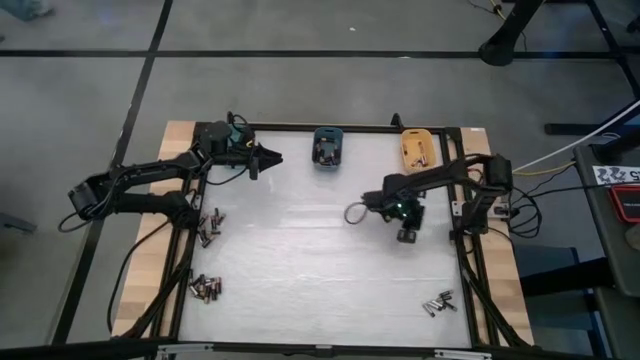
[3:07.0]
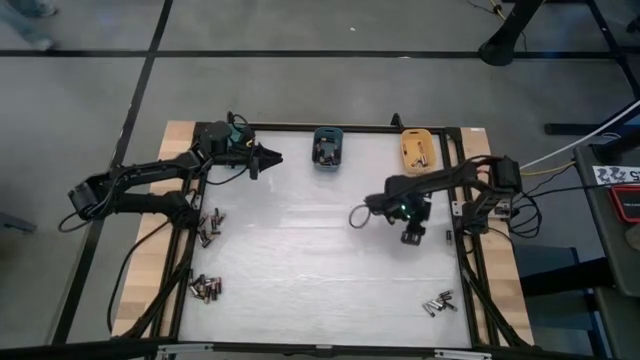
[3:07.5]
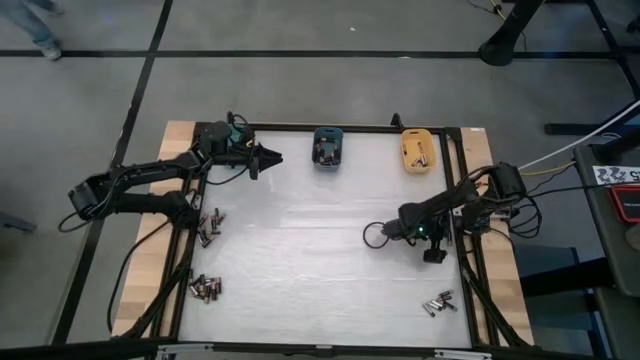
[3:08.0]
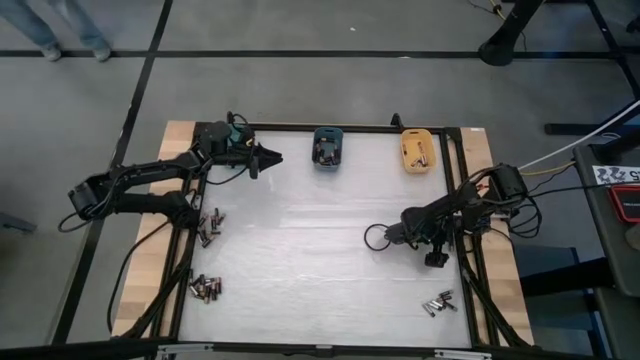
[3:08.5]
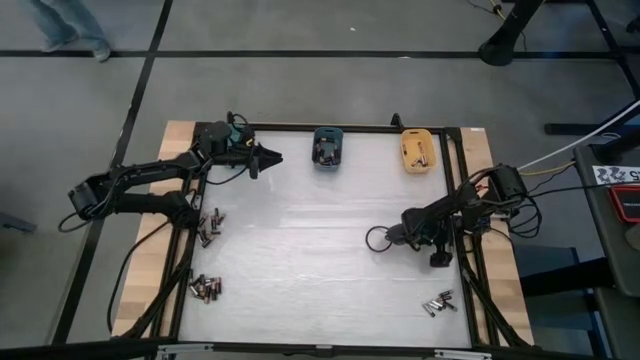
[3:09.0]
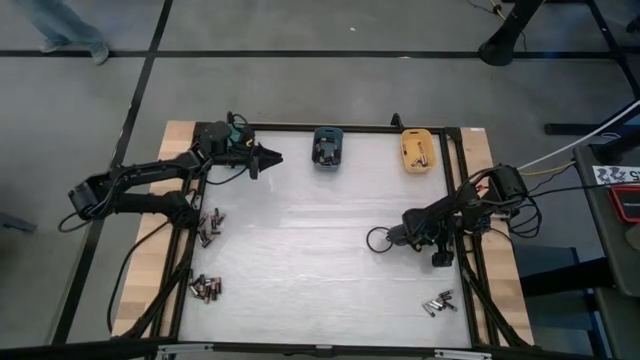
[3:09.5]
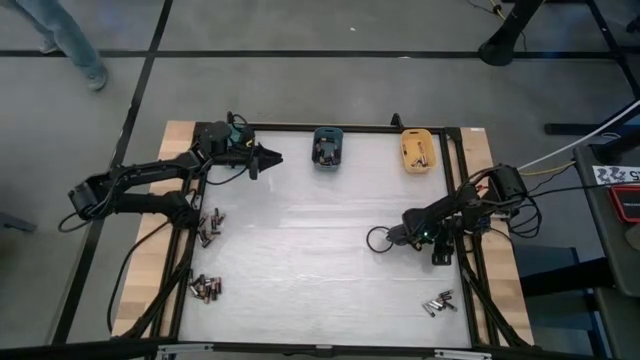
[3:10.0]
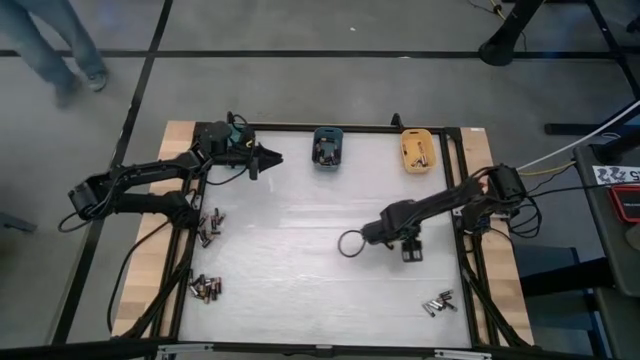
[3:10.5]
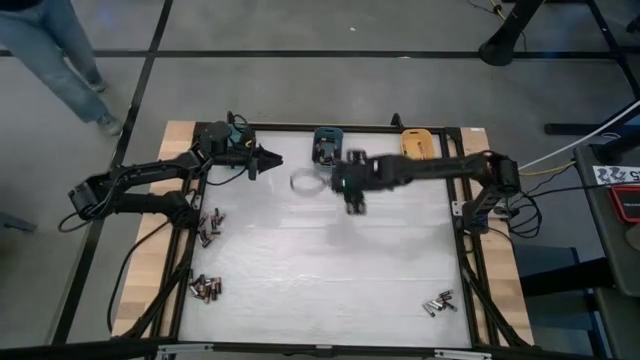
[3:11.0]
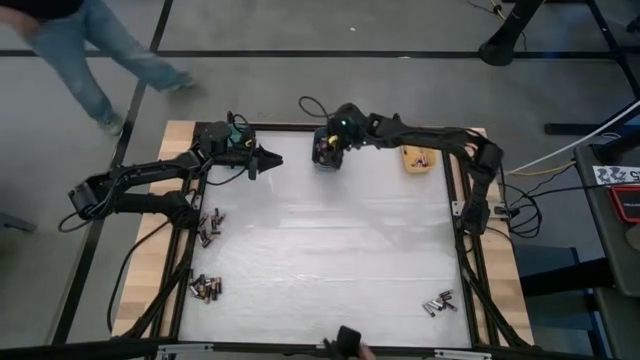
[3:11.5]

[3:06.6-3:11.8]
Task: Sort batteries
Put the brown battery into the blue bin

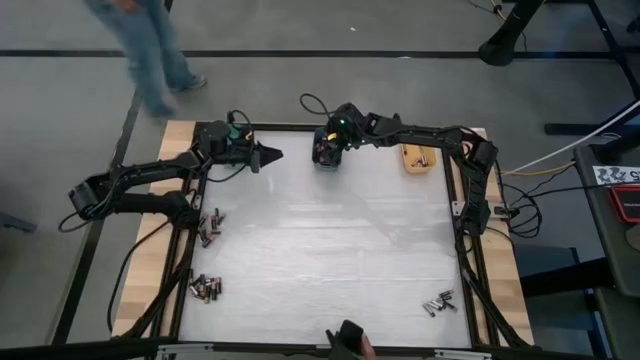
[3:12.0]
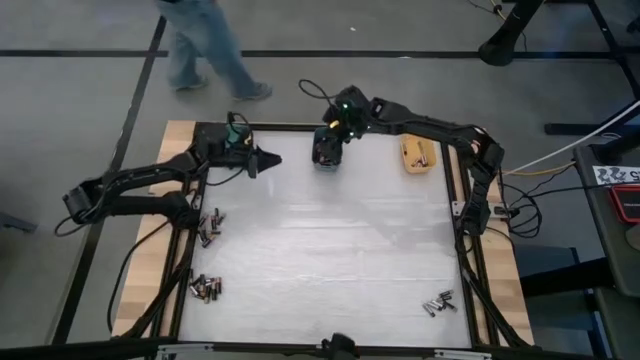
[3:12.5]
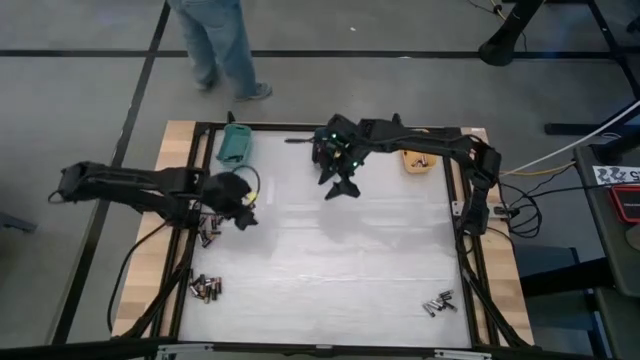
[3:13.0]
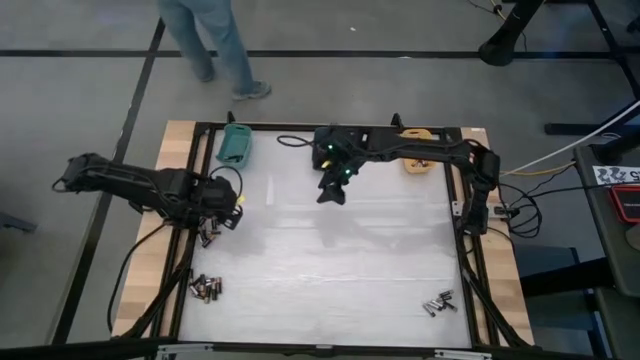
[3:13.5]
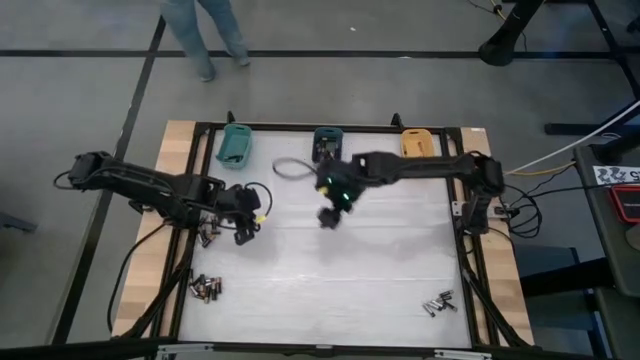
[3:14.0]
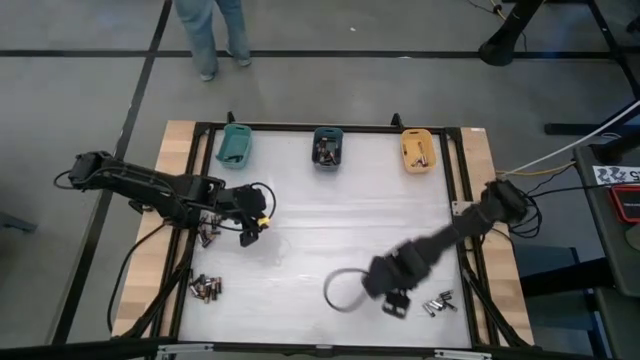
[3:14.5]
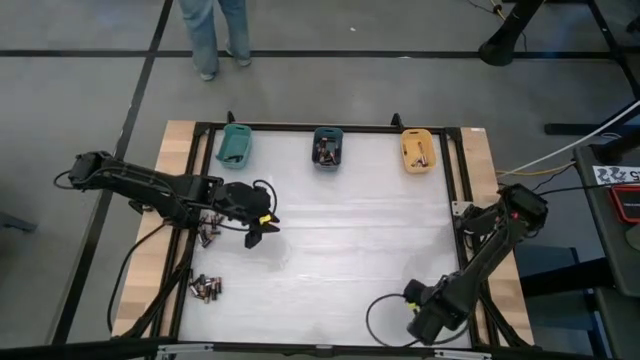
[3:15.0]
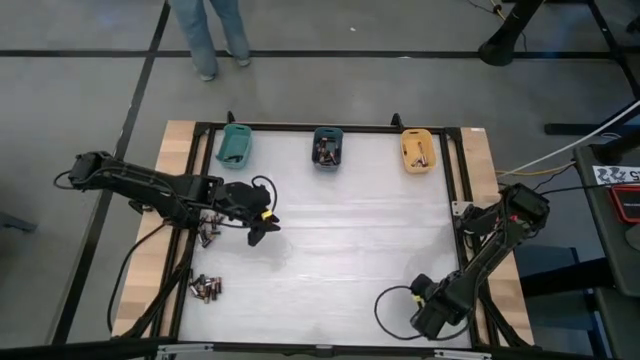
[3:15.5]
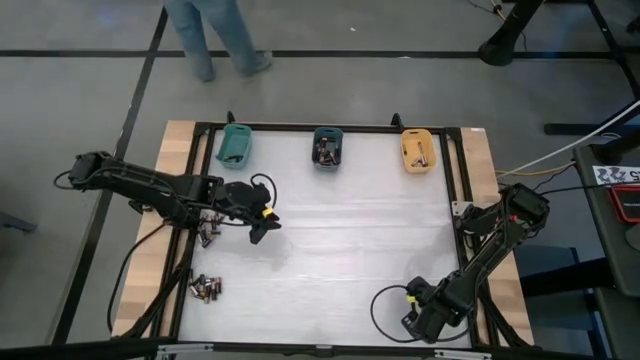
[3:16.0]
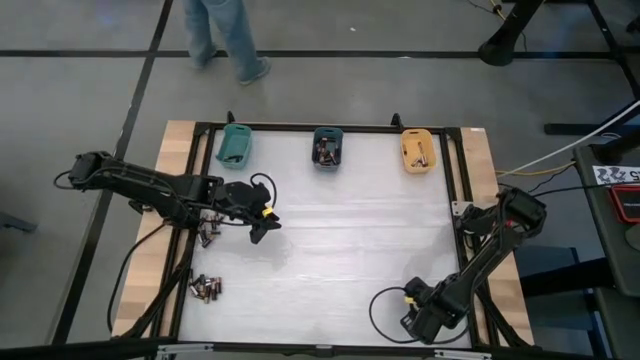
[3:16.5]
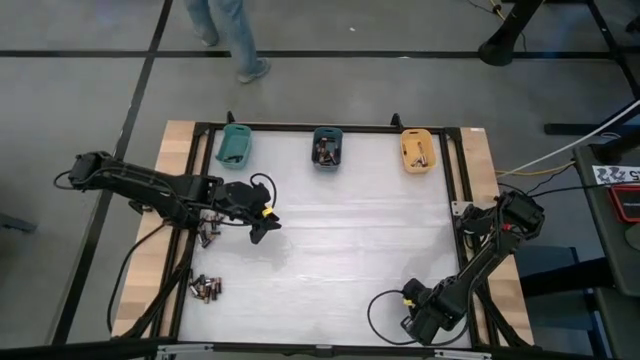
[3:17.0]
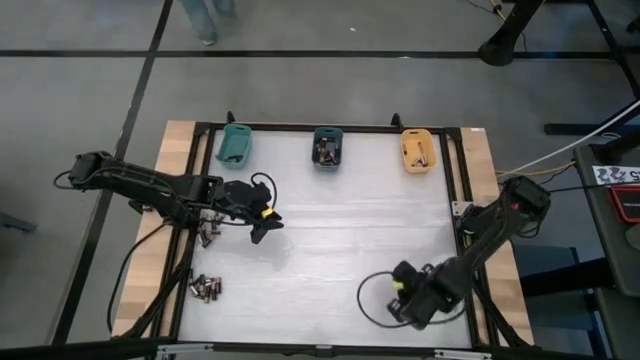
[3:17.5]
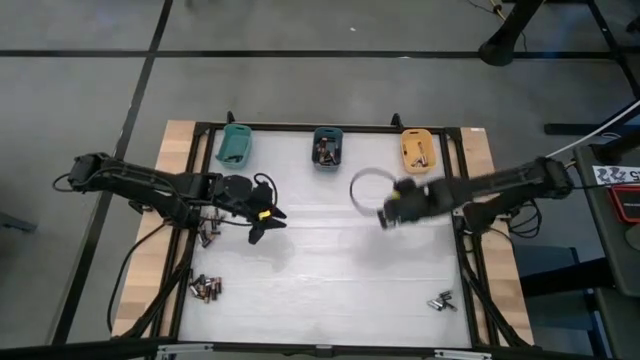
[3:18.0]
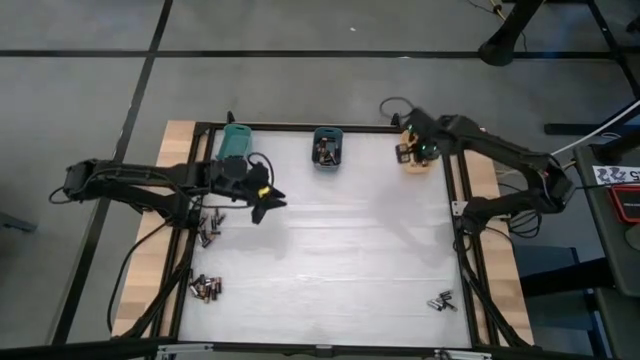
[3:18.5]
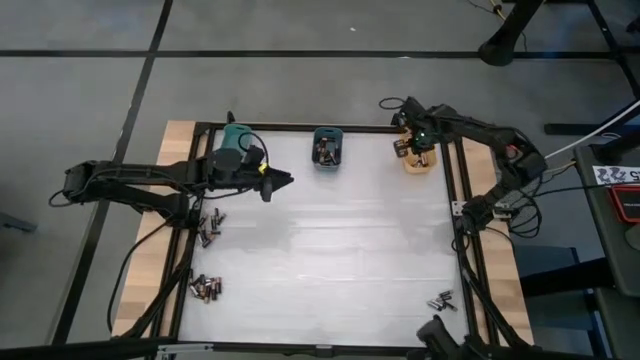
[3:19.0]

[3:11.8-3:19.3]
Put the silver battery into the yellow bin

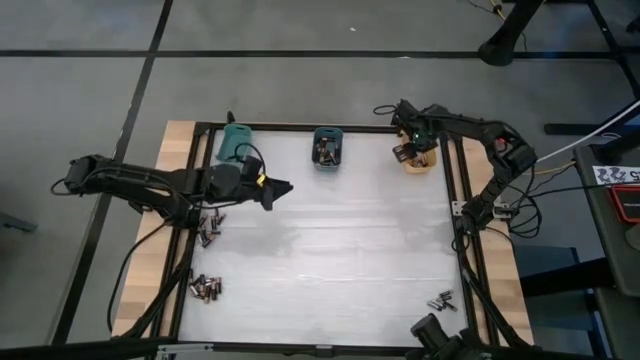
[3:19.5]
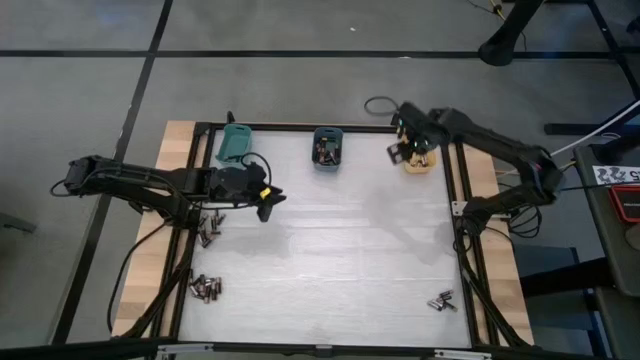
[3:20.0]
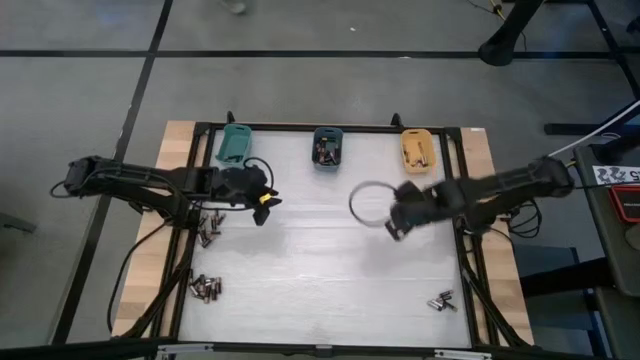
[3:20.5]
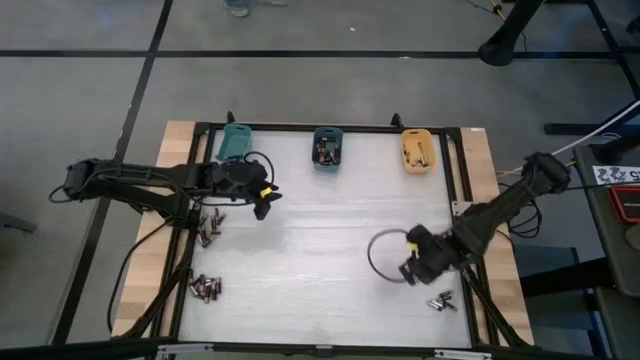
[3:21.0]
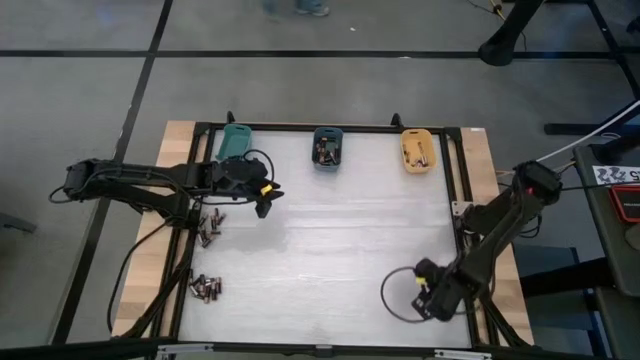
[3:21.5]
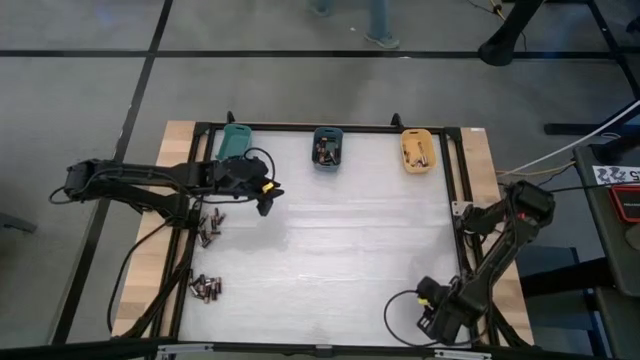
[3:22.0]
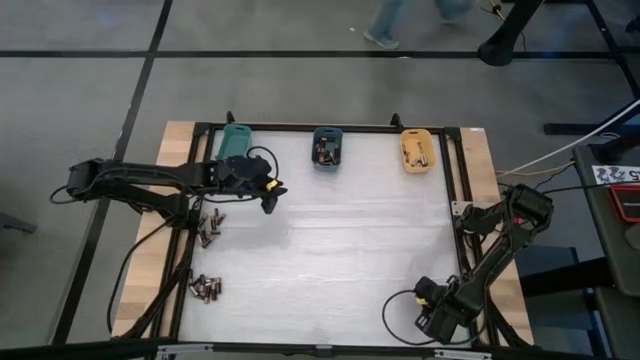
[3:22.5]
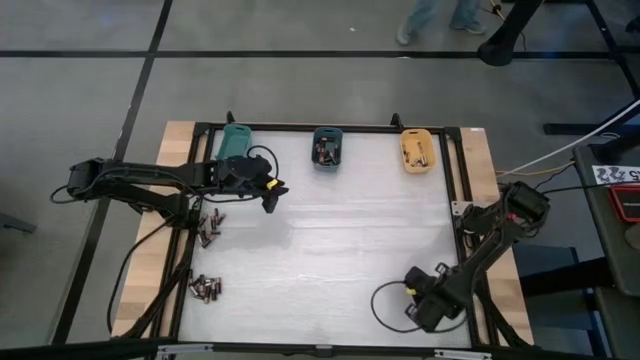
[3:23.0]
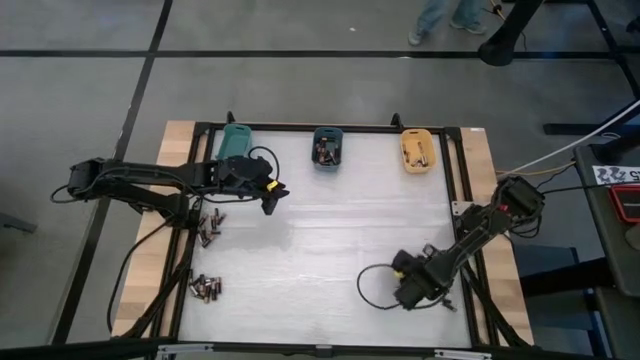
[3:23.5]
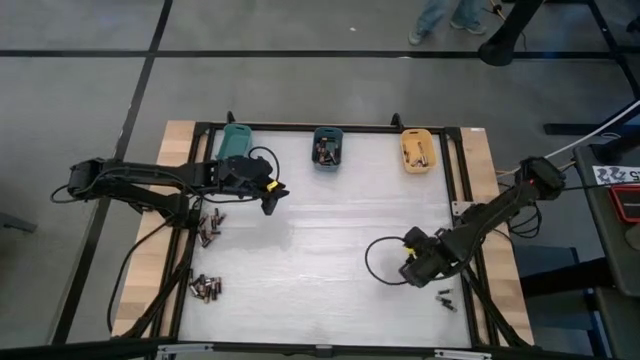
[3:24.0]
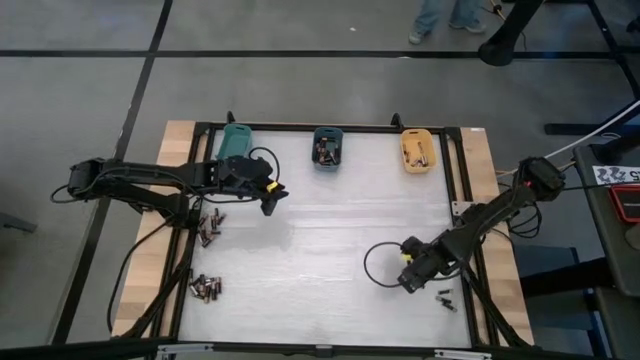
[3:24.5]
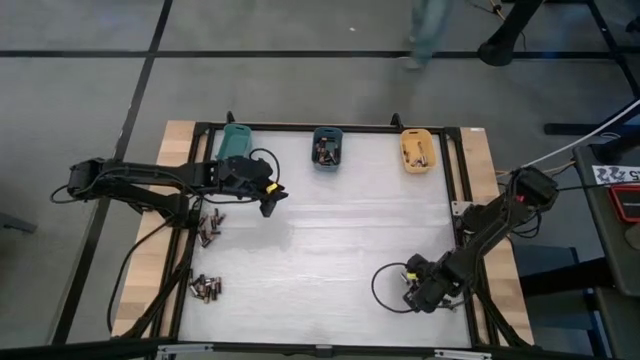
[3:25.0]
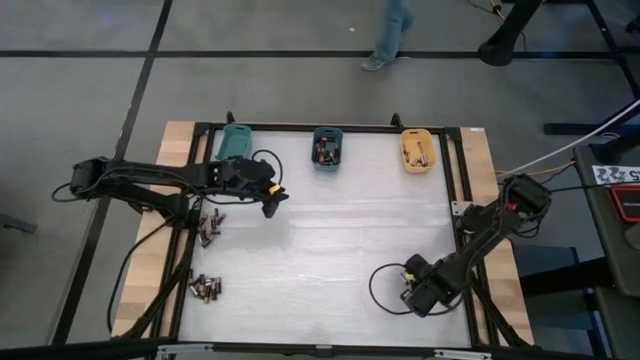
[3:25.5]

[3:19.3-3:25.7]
Put the silver battery into the yellow bin

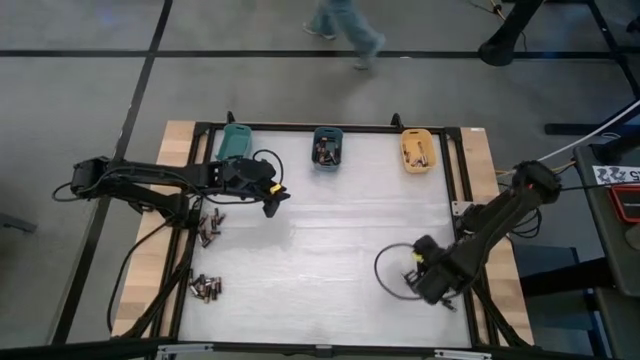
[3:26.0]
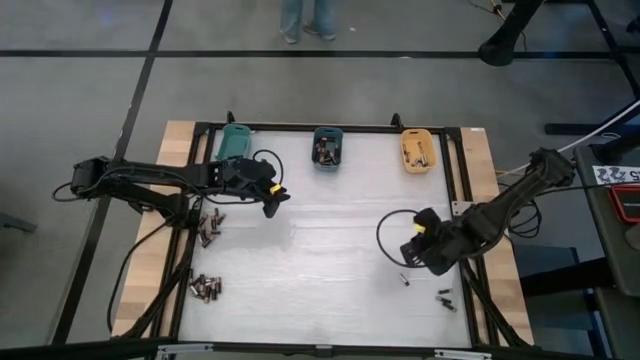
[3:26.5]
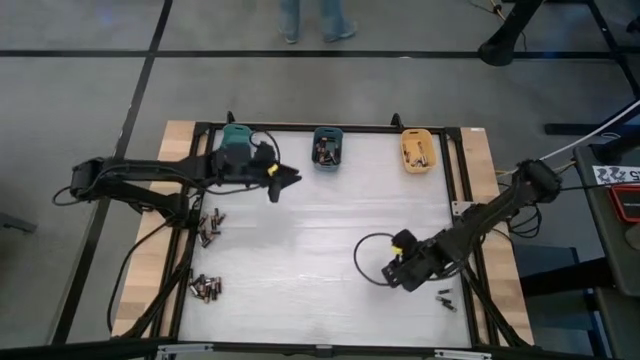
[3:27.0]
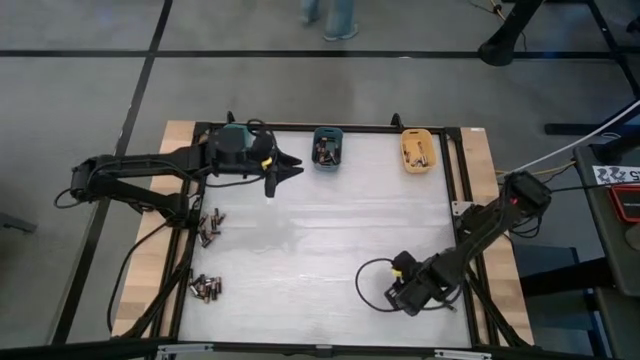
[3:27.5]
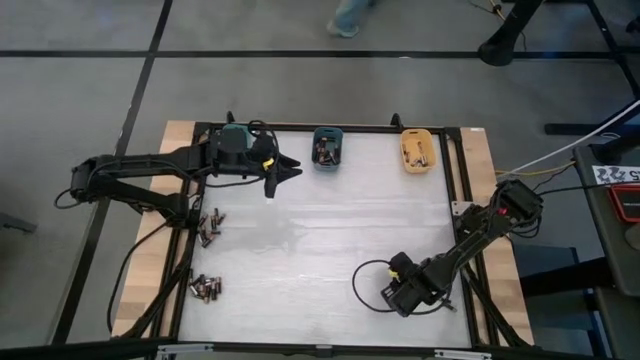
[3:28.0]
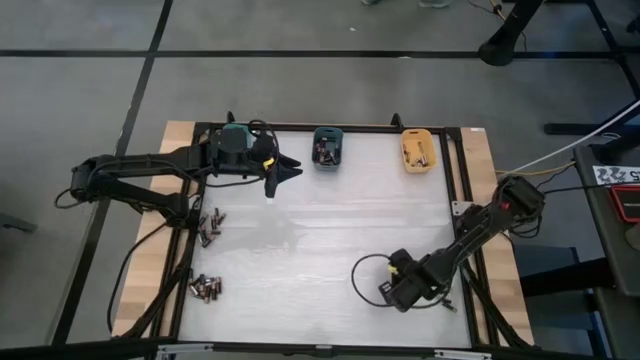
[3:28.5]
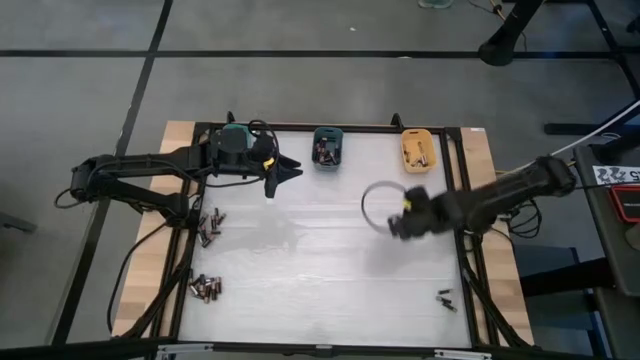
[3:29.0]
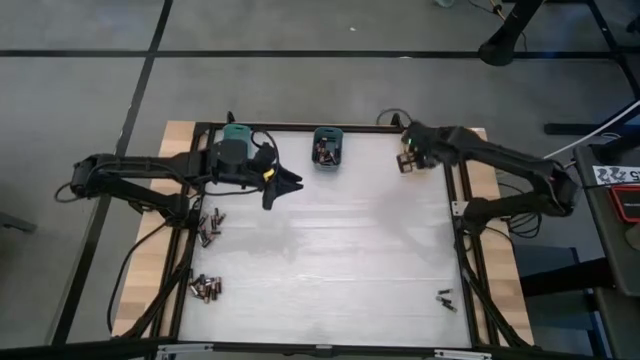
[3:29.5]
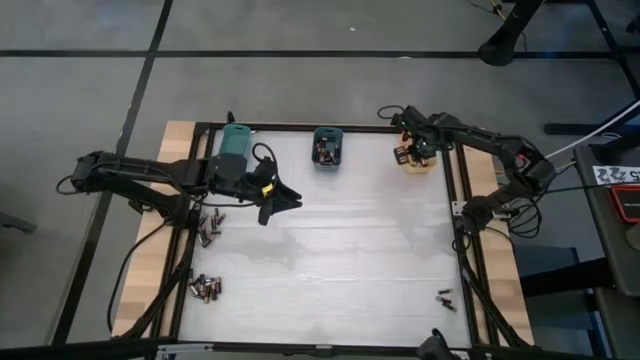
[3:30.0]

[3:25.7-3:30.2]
Put the silver battery into the yellow bin
